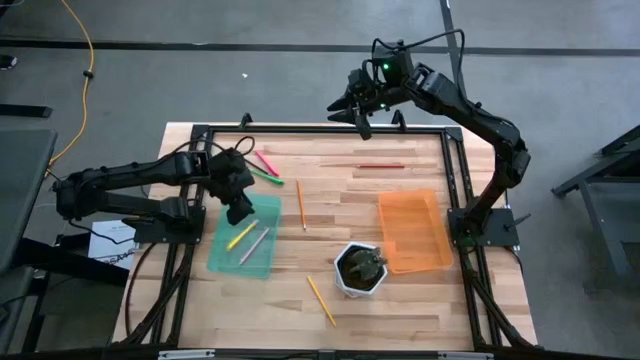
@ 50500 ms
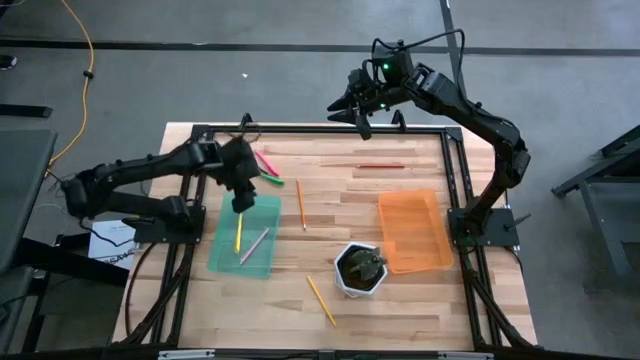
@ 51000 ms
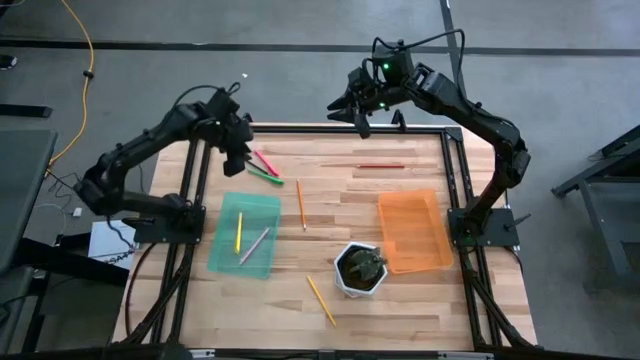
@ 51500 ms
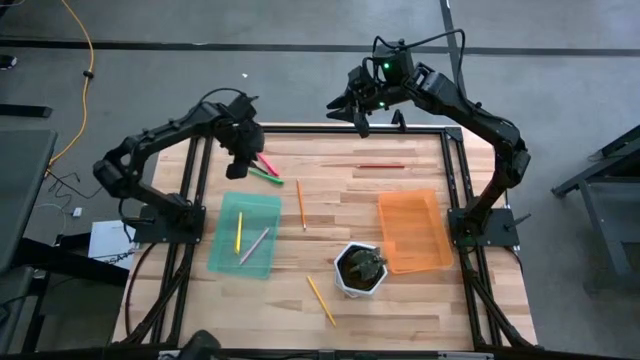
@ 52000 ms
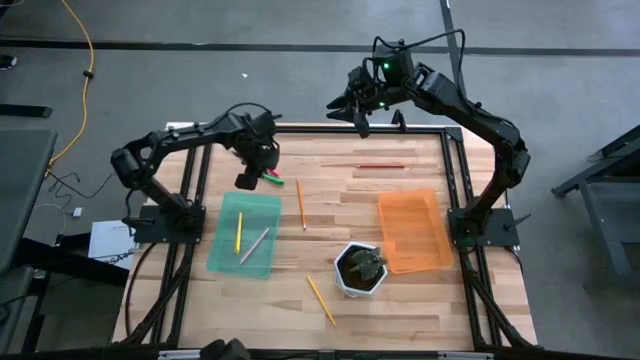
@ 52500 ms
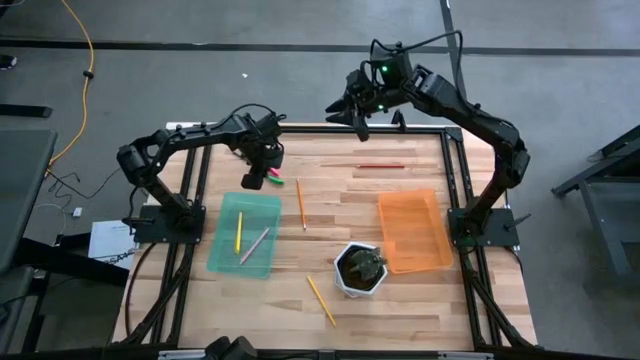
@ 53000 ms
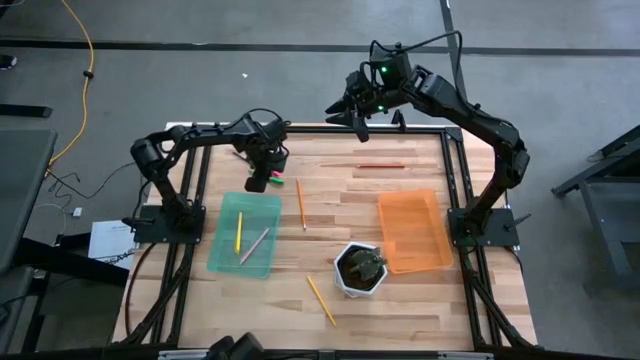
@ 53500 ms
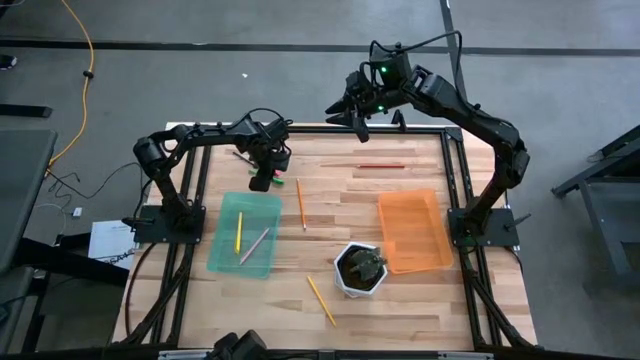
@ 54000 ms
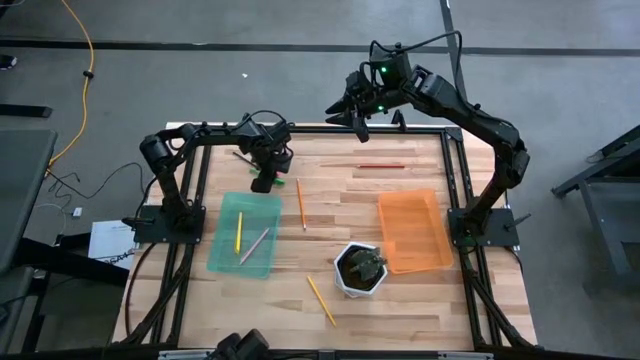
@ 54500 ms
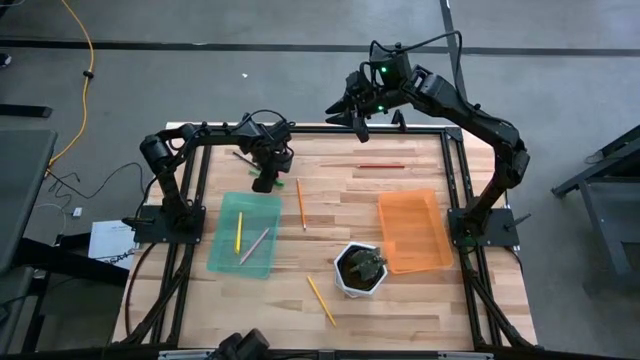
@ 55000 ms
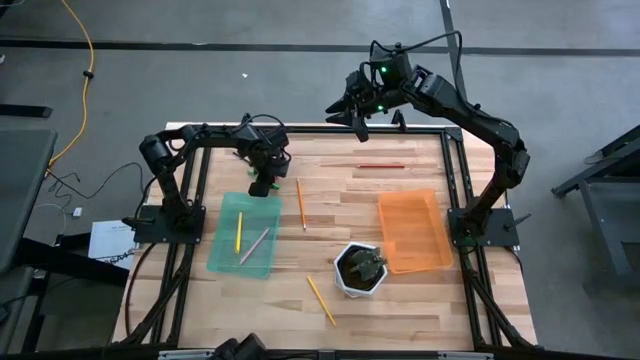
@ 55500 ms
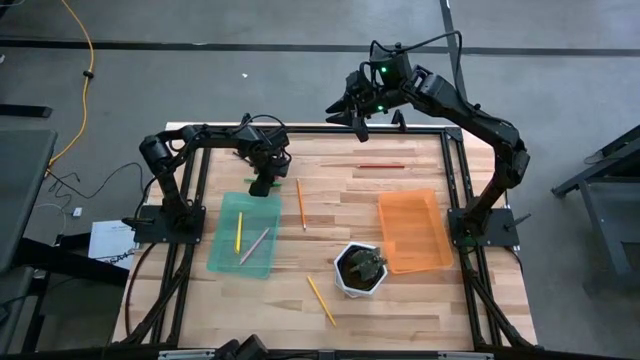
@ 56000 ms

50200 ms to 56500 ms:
Task: Sort pens & pencils
Put the green pen into the green bin

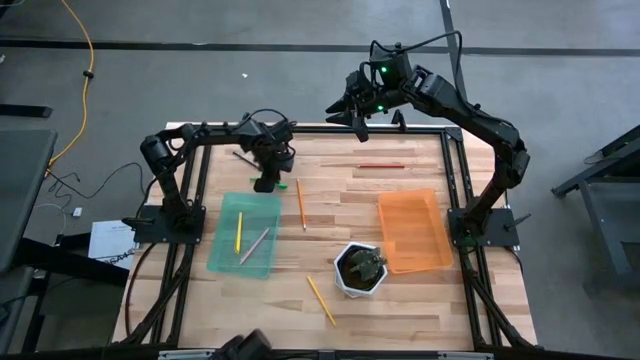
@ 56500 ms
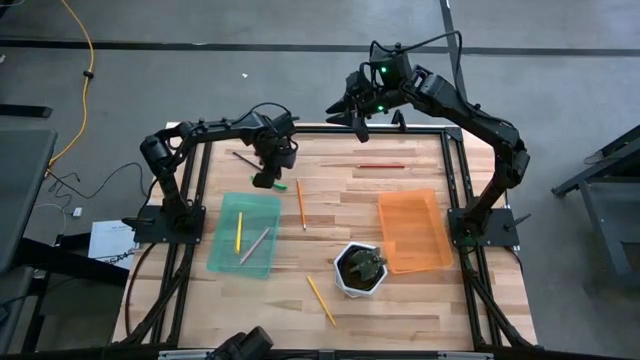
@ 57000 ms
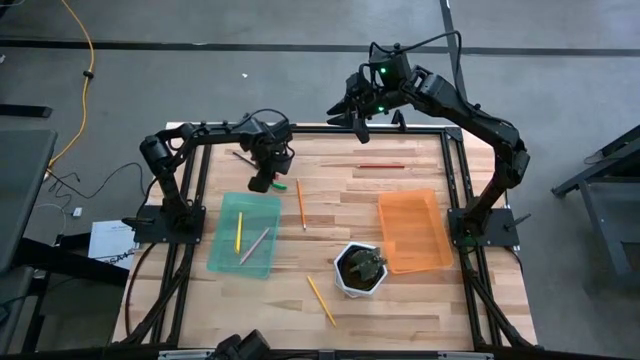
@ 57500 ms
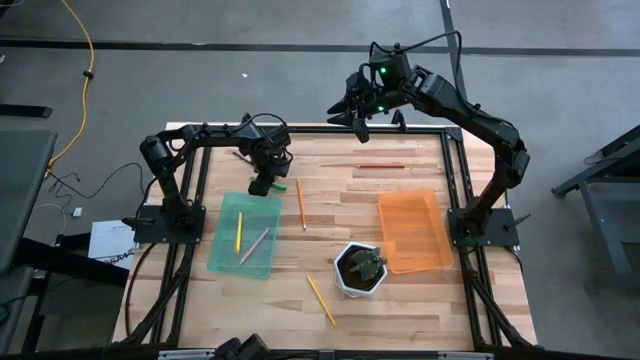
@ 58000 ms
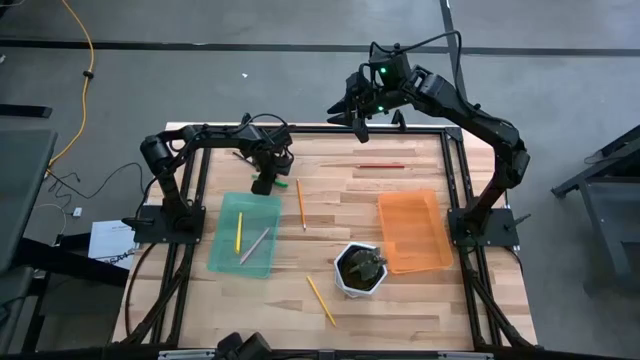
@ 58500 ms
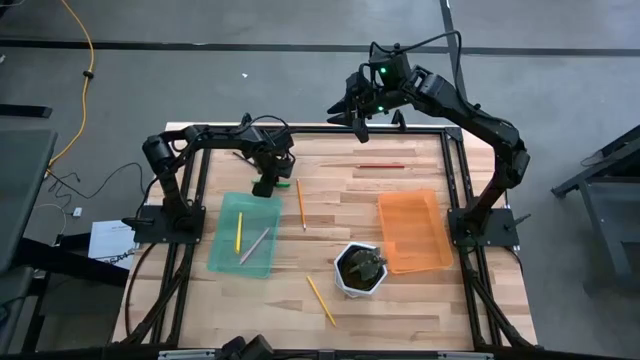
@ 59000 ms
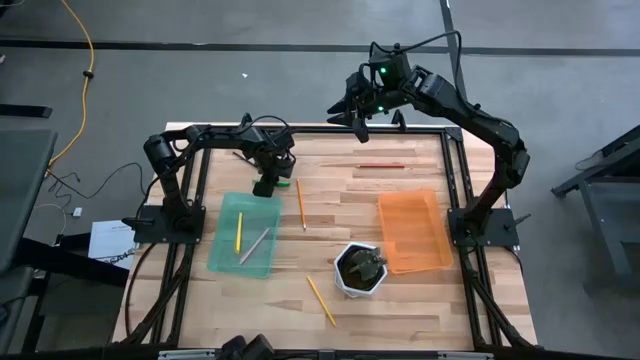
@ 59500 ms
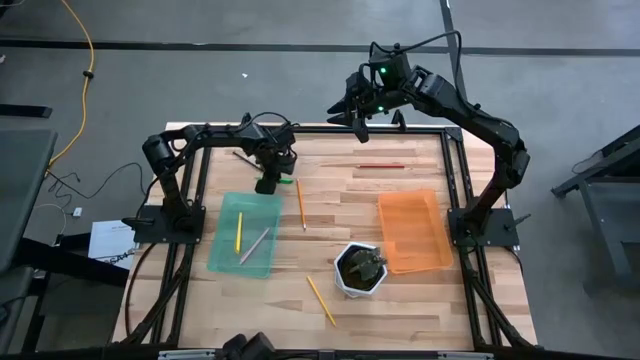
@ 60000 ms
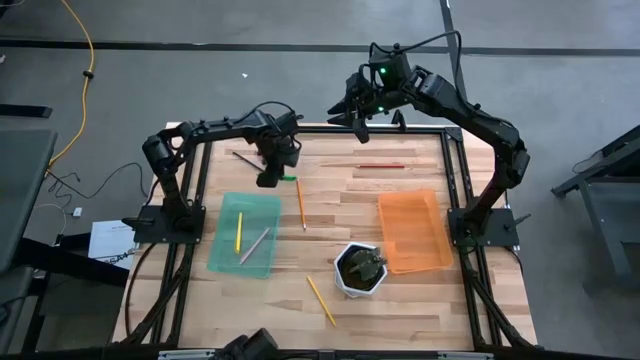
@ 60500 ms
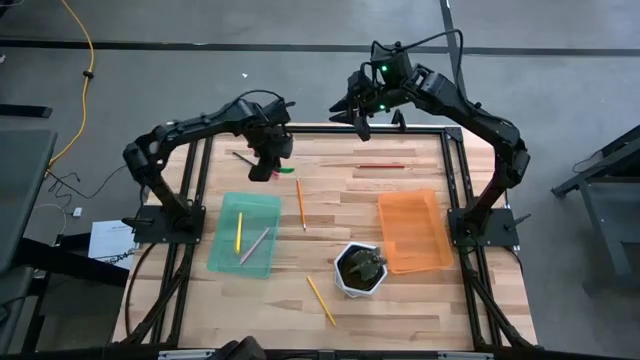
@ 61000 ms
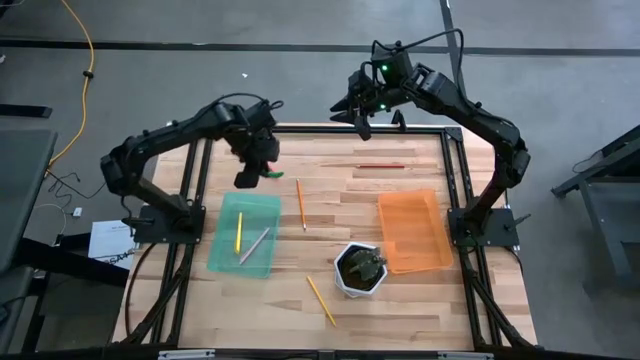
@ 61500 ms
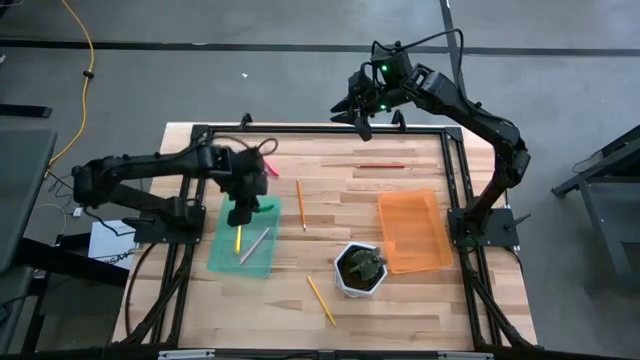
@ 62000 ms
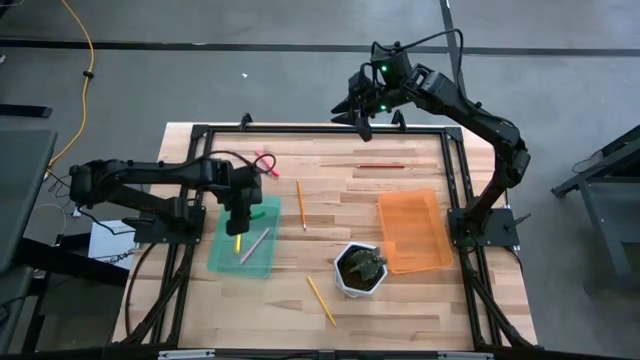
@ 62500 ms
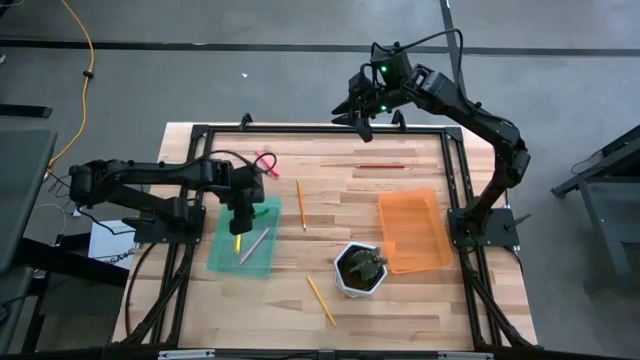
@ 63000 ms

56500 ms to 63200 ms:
Put the green pen into the green bin

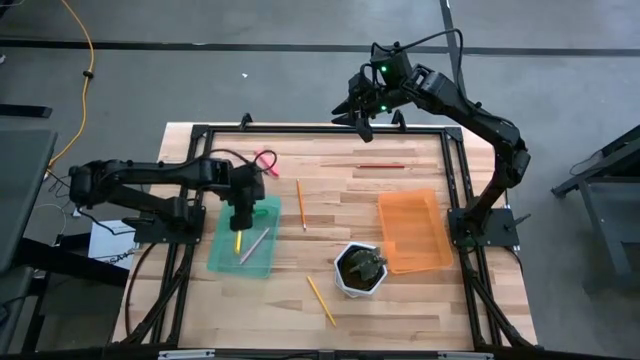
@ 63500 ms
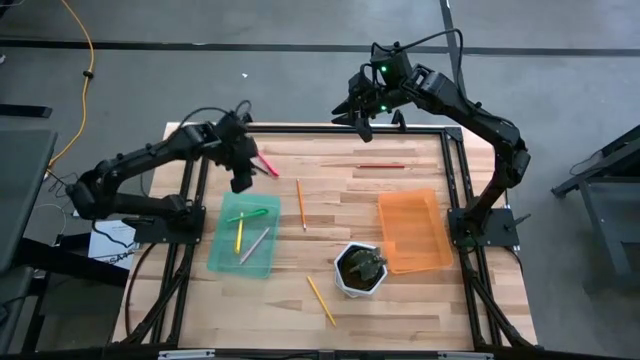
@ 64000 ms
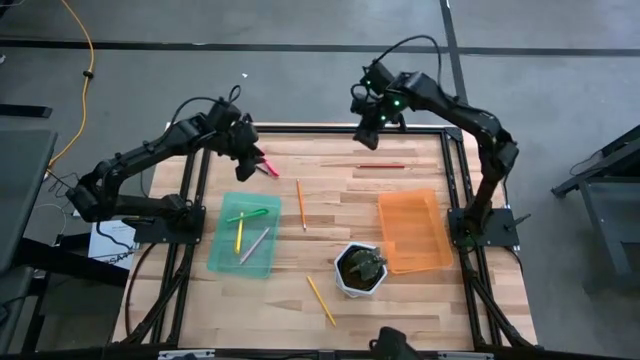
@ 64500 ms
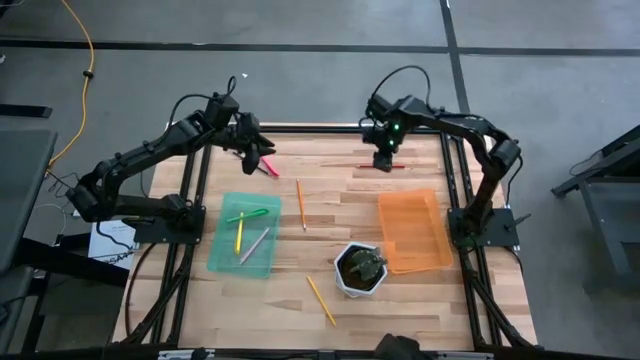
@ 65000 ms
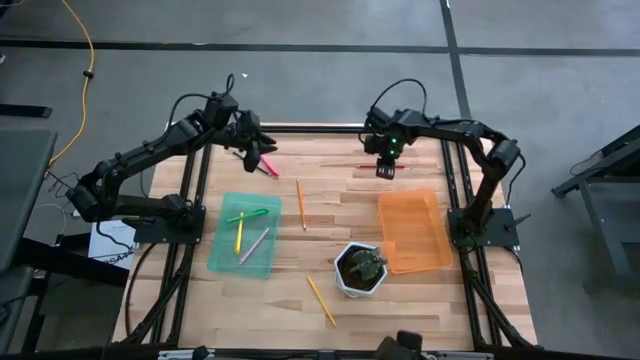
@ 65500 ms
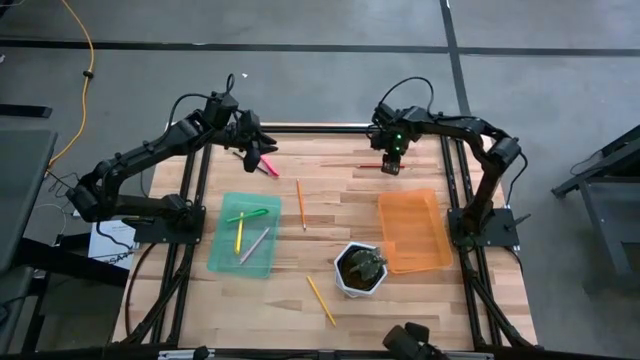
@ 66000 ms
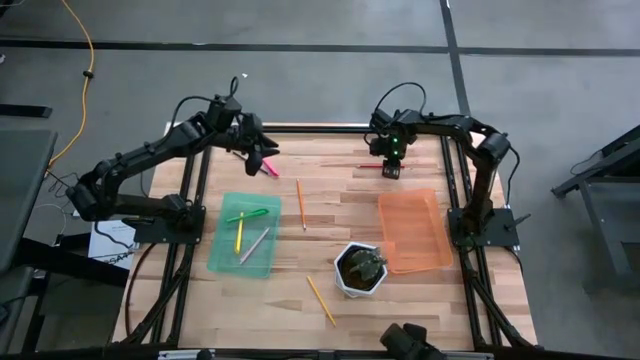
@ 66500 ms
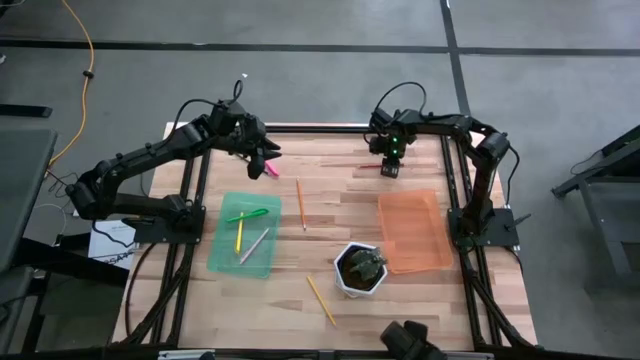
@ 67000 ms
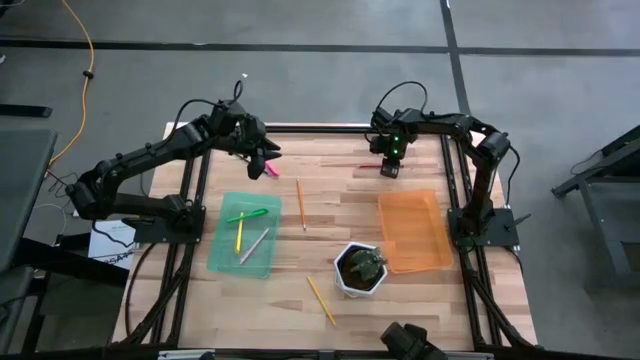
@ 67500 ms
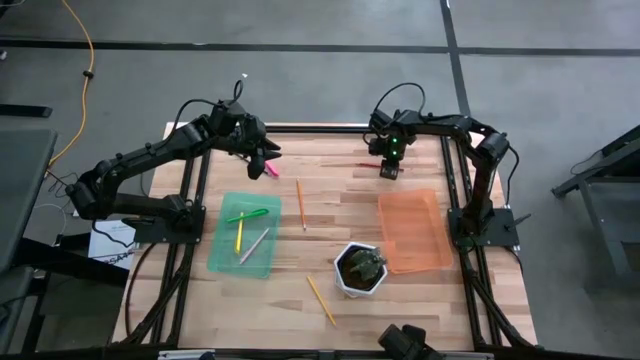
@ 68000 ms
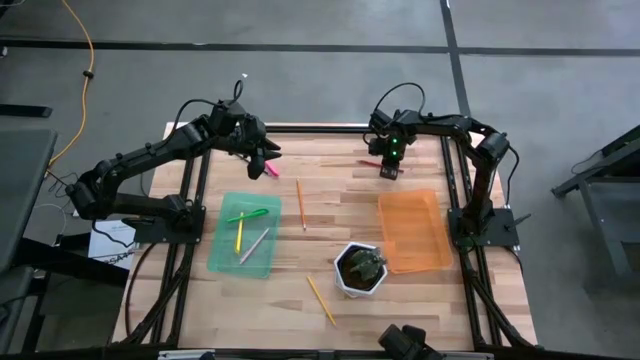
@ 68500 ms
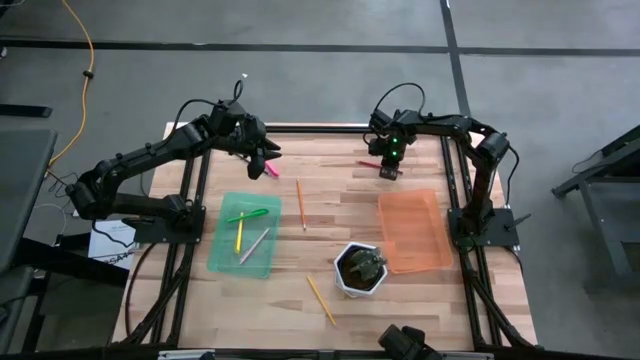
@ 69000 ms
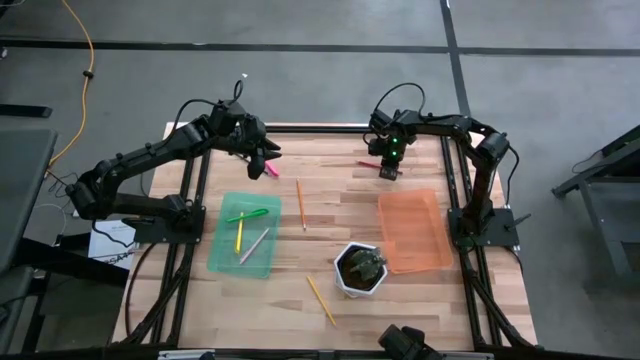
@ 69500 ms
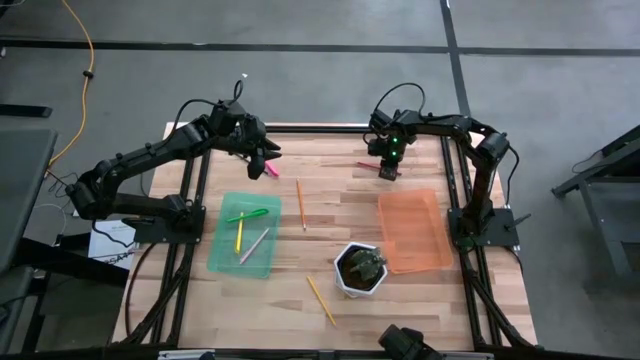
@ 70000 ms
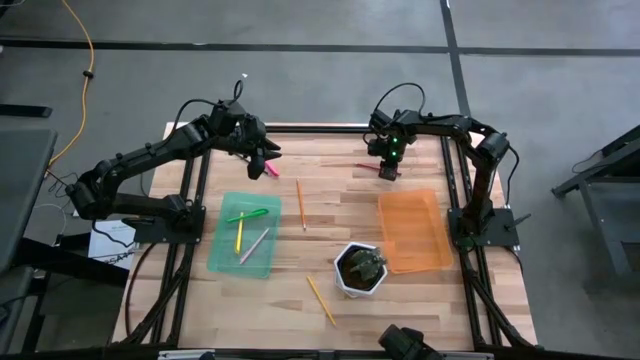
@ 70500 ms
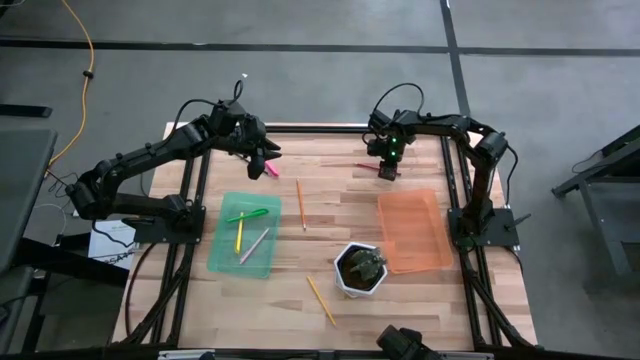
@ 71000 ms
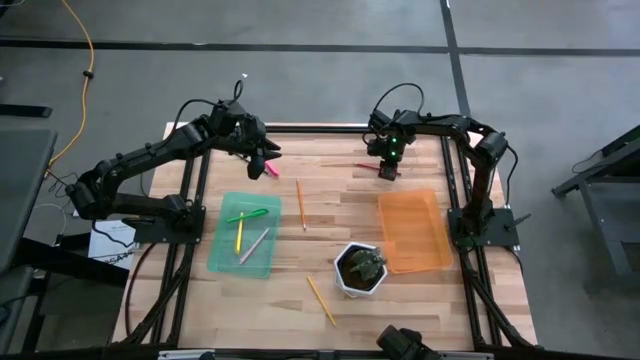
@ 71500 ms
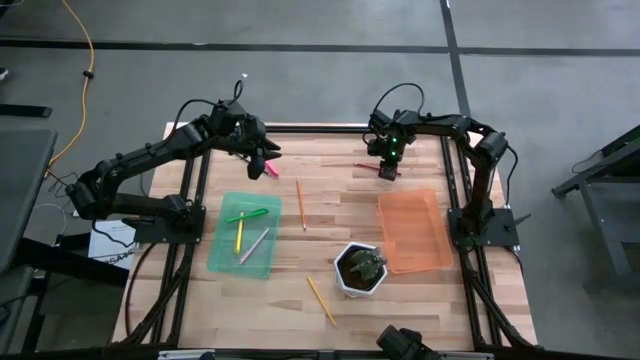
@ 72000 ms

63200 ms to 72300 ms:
Put the red pencil into the orange bin
